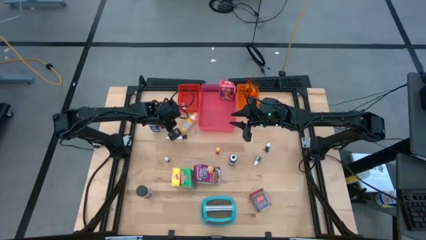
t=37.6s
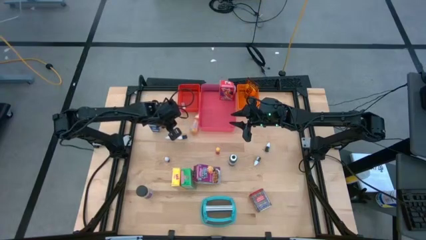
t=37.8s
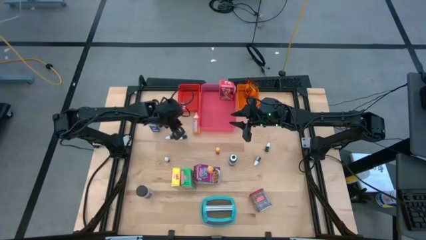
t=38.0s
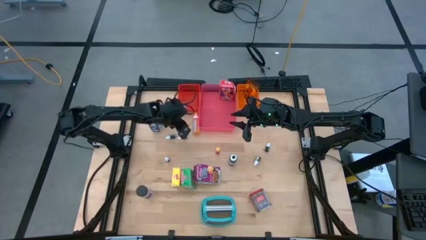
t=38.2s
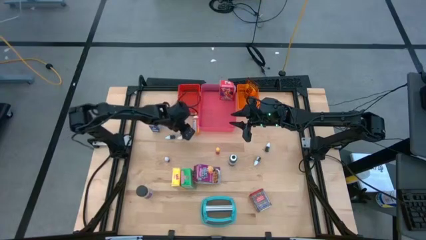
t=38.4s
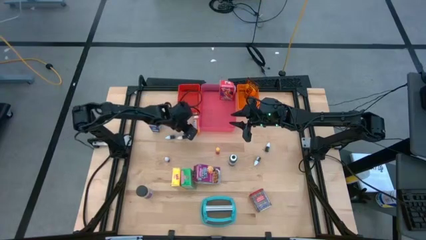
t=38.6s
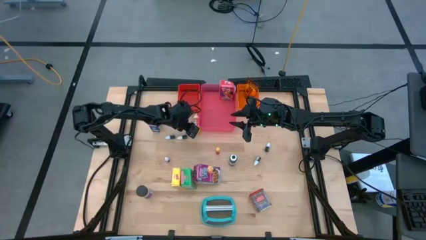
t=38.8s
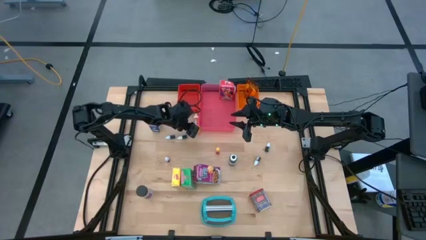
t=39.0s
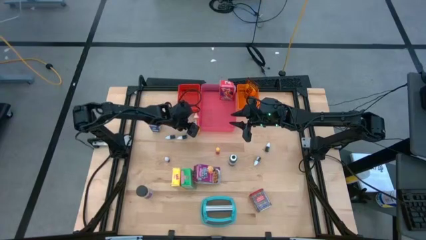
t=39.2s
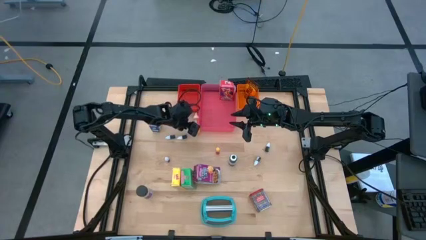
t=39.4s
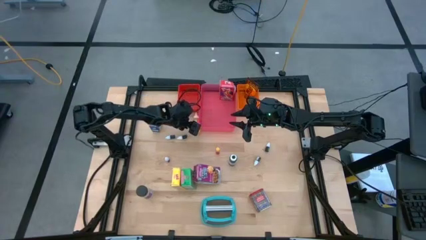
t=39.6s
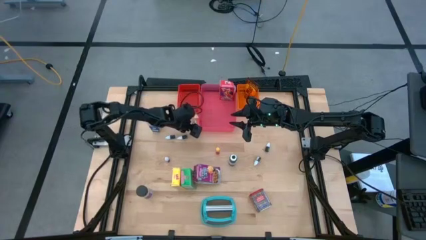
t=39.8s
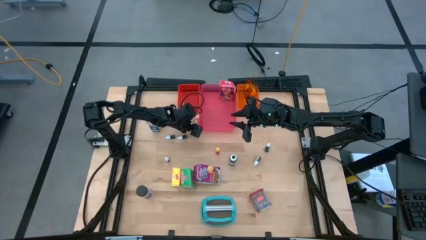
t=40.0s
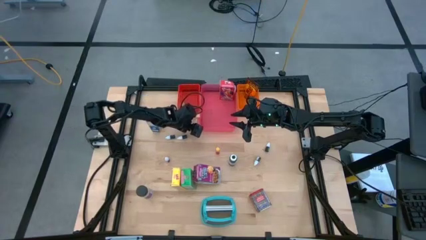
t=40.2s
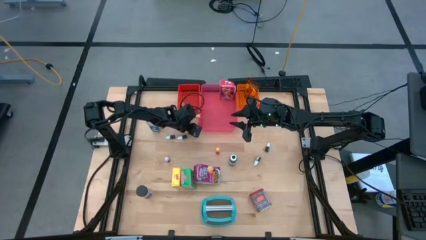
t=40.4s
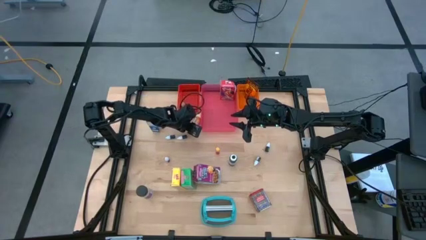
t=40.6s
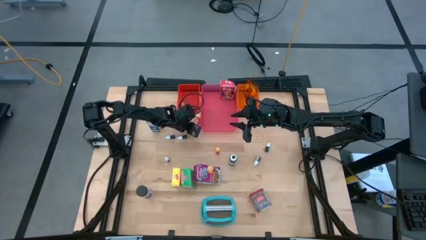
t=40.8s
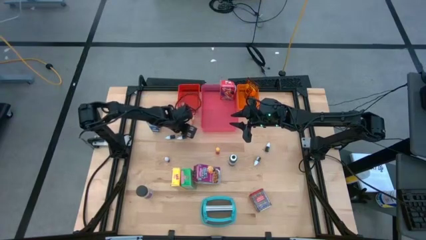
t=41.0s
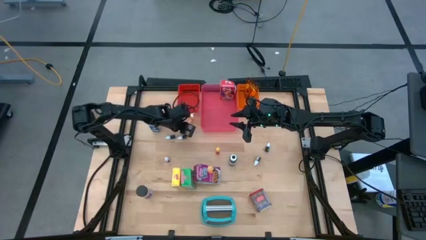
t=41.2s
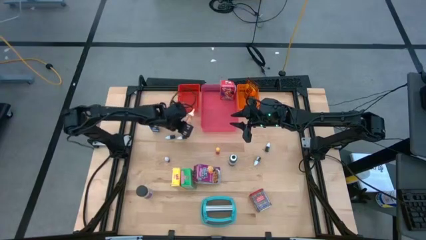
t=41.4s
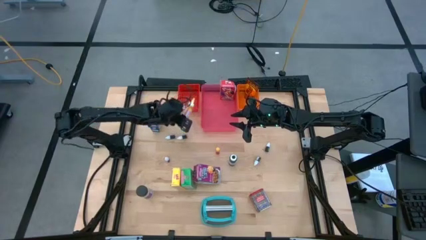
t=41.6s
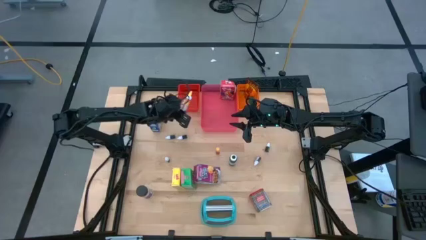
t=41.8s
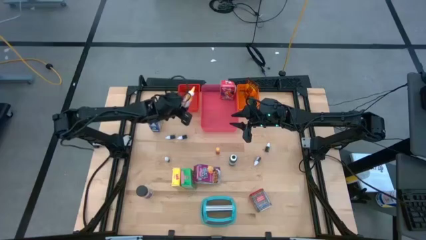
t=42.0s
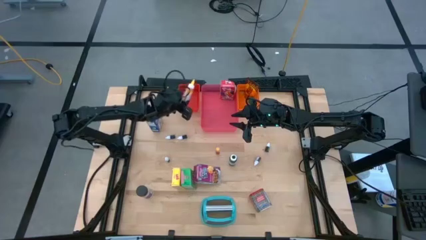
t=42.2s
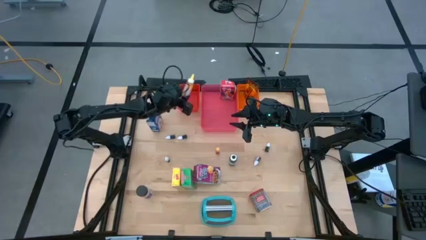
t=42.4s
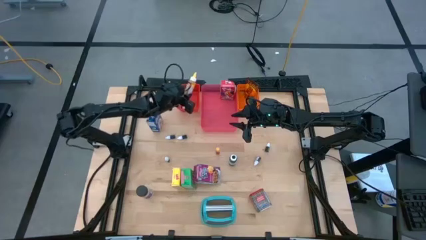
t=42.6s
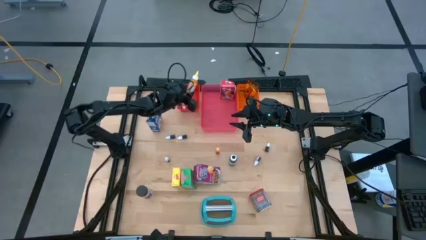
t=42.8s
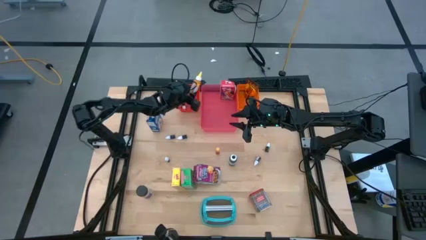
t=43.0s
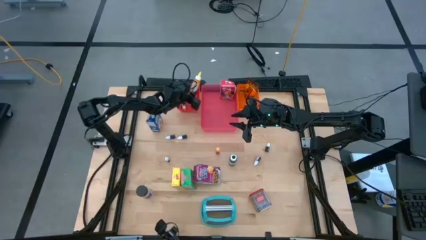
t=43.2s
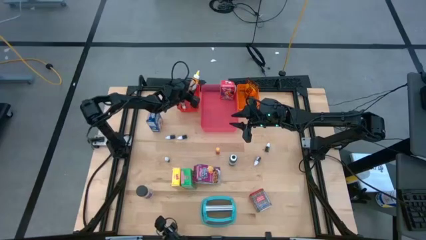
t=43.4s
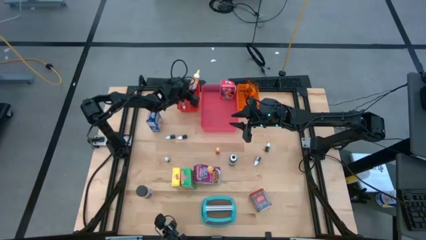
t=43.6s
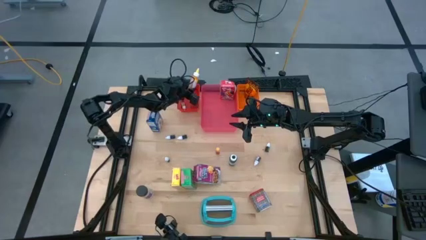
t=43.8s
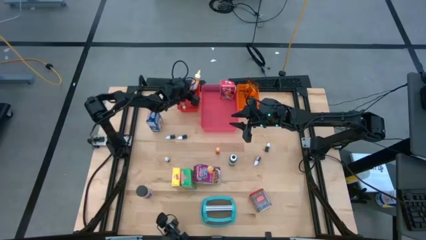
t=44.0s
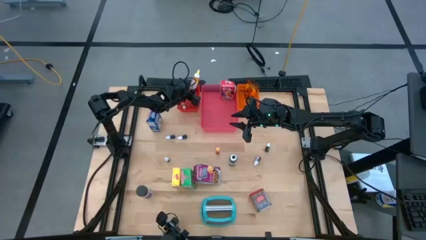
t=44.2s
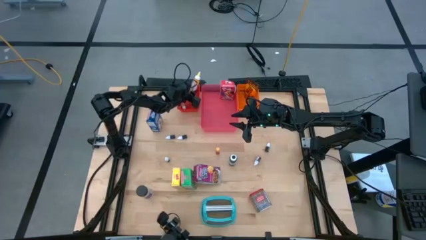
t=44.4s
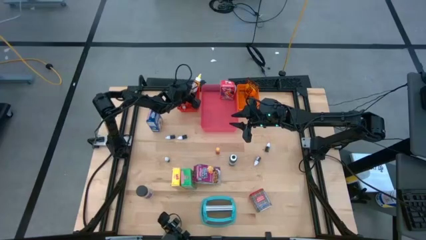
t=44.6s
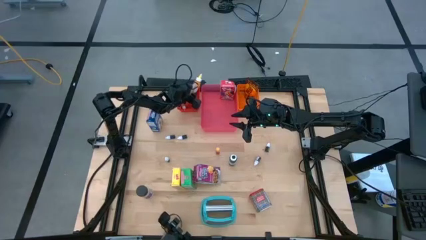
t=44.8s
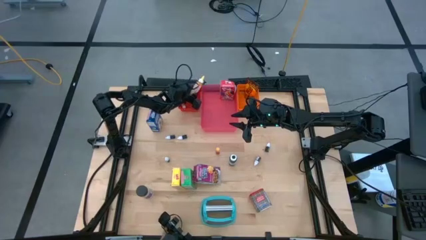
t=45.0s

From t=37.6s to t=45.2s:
Task: Pick & Place Kitchen Items
Put the large yellow food coloring bottle into the red bin

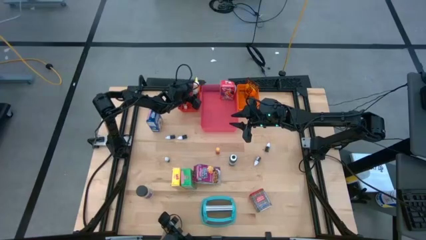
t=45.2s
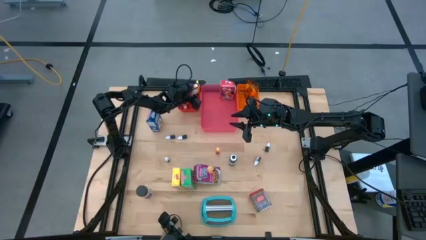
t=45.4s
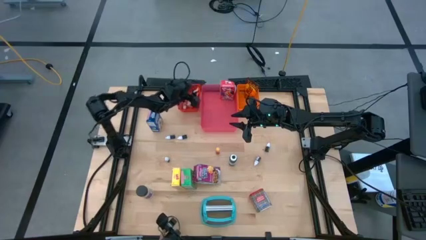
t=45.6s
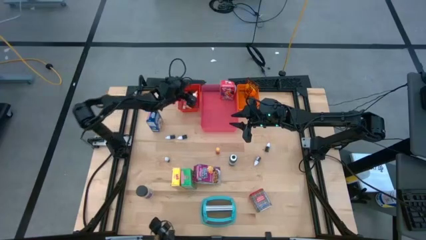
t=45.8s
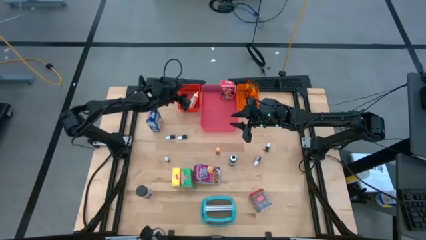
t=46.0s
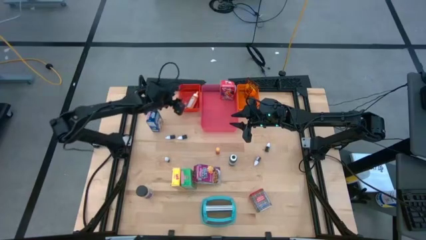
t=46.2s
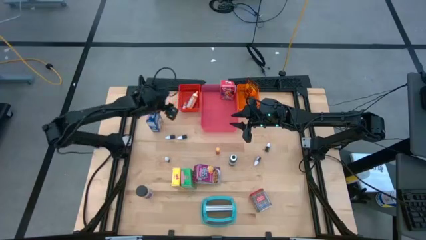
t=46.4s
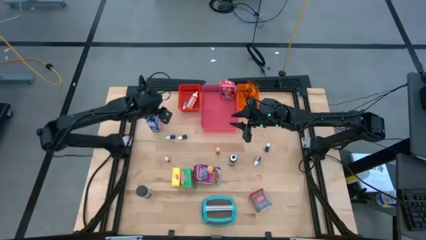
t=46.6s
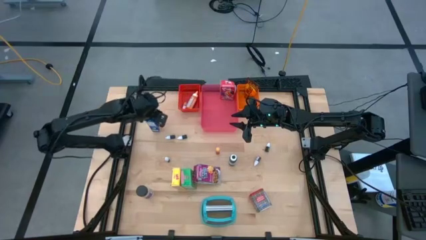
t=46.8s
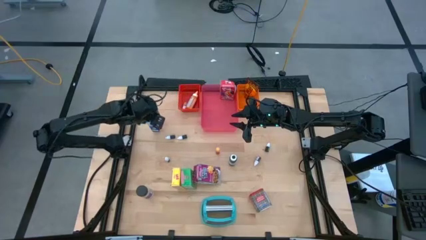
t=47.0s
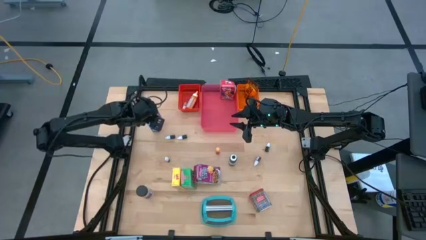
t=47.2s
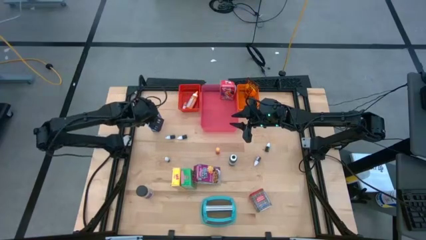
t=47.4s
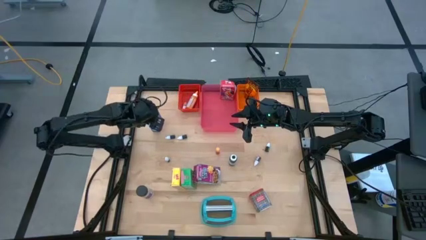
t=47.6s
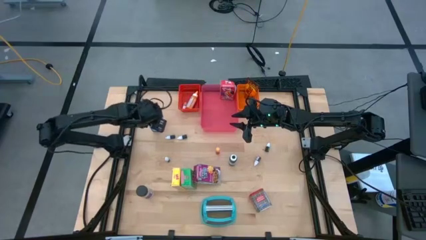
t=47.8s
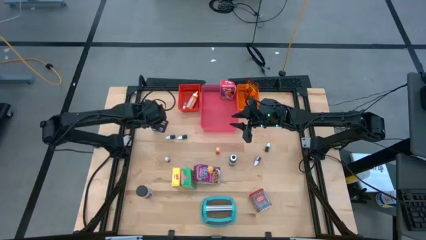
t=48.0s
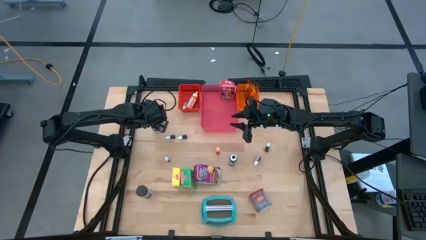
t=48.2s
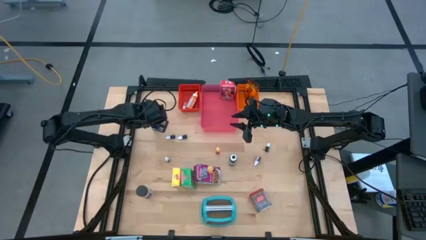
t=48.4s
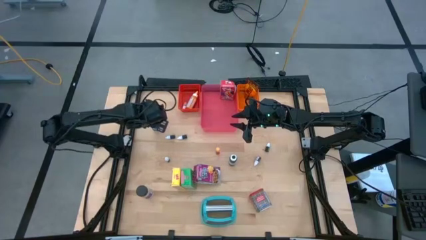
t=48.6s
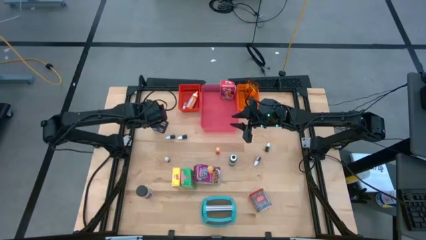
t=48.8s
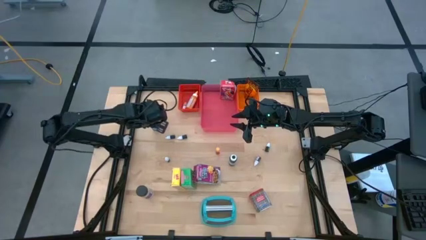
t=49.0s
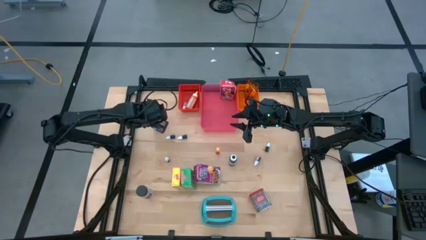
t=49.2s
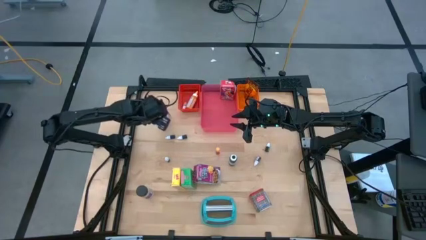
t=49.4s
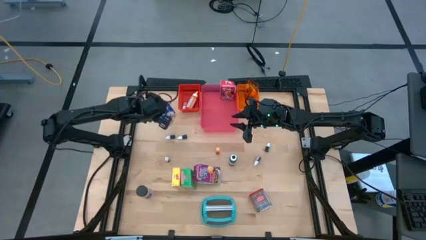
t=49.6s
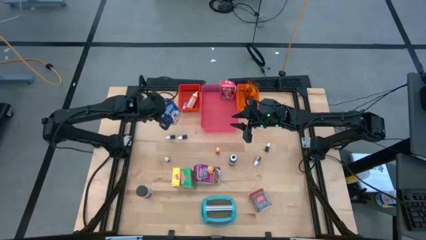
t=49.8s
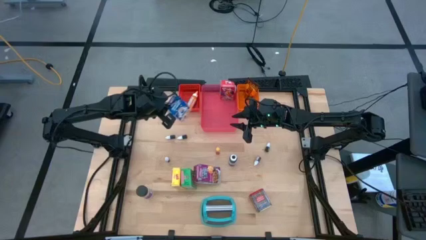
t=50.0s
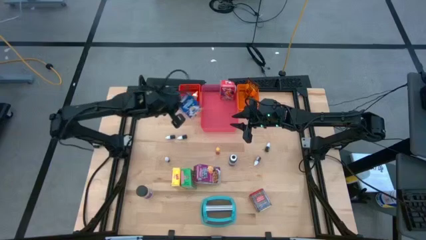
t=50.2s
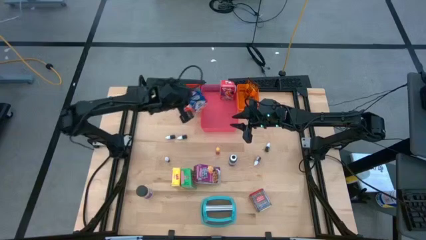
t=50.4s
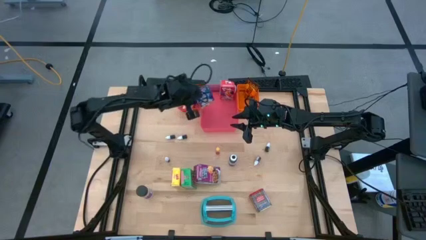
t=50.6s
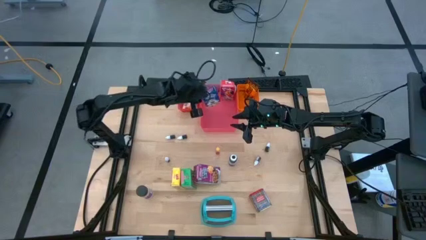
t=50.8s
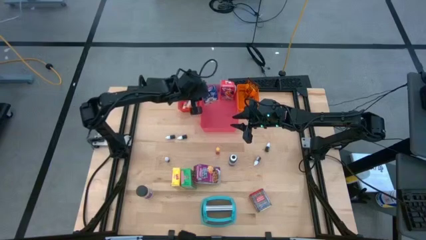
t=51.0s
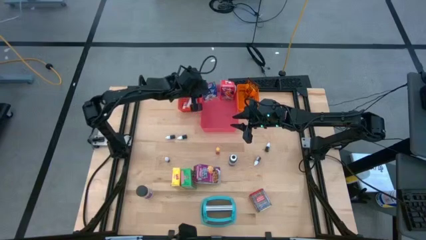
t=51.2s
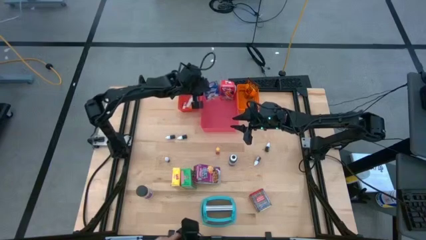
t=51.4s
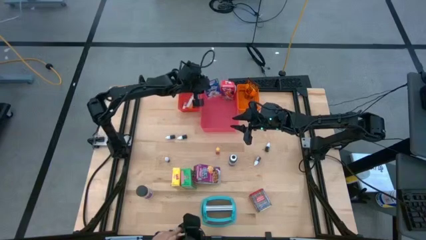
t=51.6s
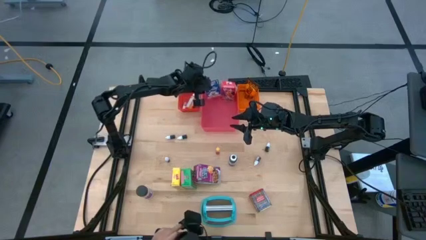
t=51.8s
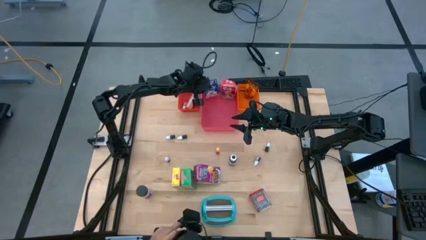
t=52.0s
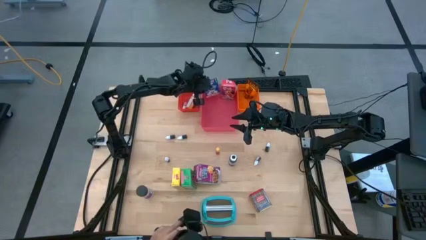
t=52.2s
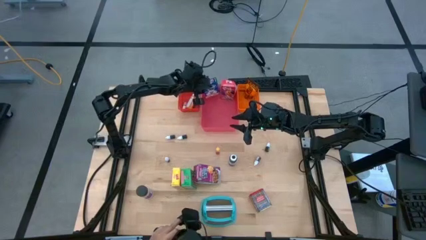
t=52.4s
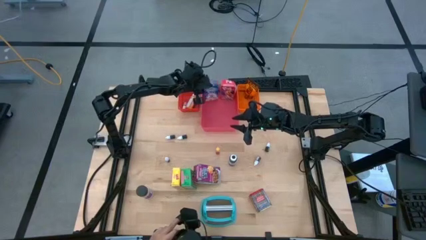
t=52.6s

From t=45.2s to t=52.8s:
Put the blue cereal box into the pink bin

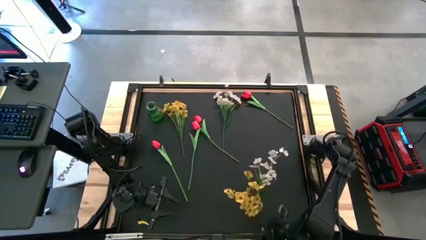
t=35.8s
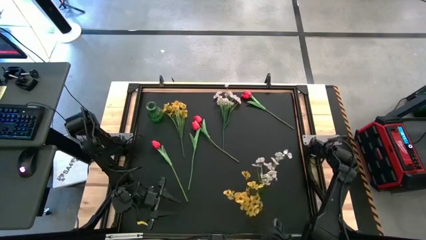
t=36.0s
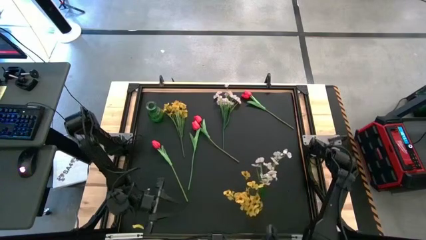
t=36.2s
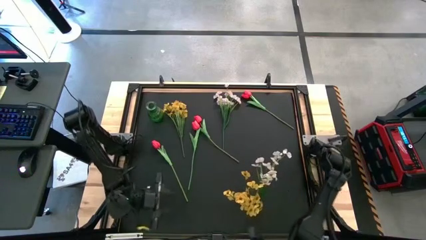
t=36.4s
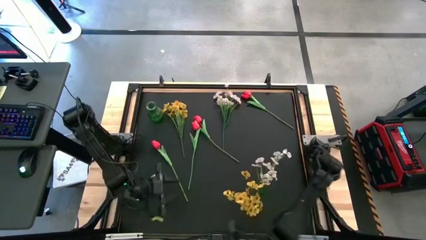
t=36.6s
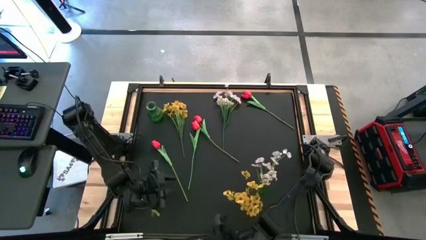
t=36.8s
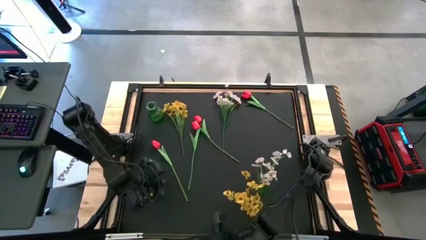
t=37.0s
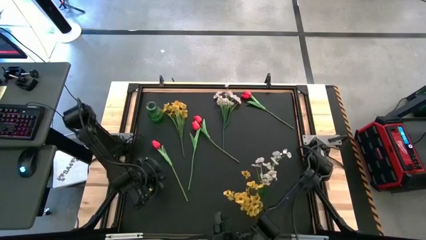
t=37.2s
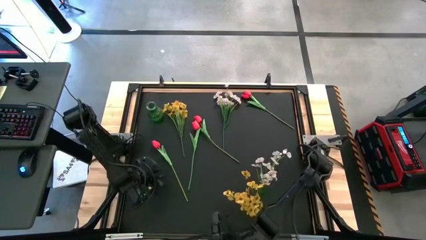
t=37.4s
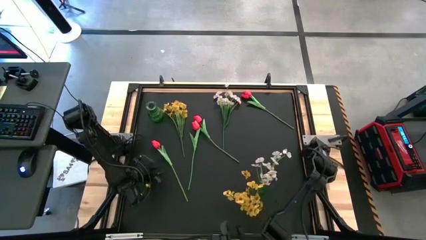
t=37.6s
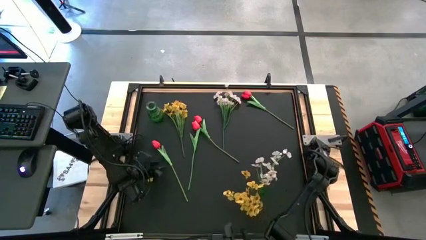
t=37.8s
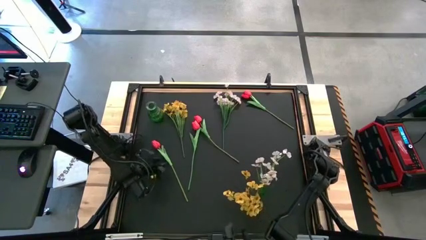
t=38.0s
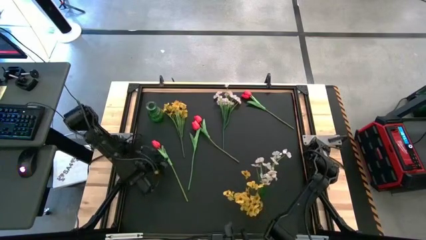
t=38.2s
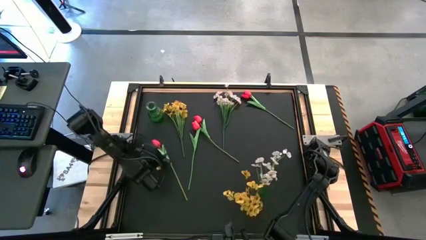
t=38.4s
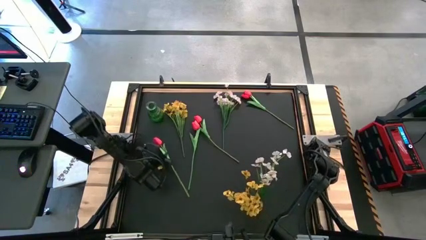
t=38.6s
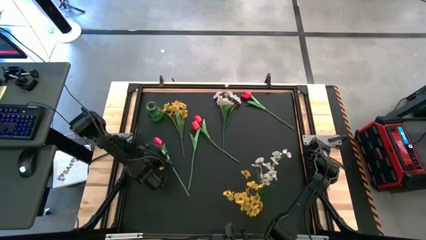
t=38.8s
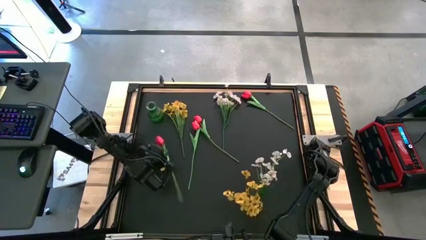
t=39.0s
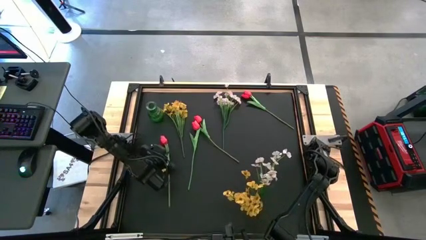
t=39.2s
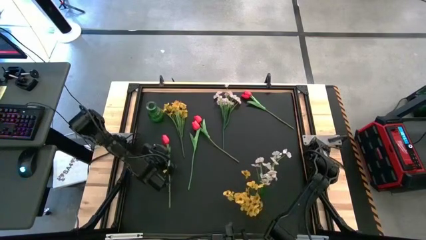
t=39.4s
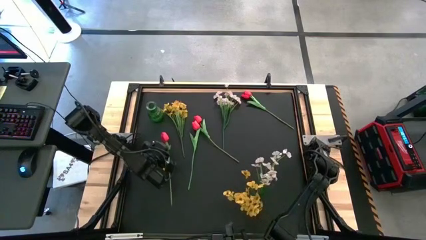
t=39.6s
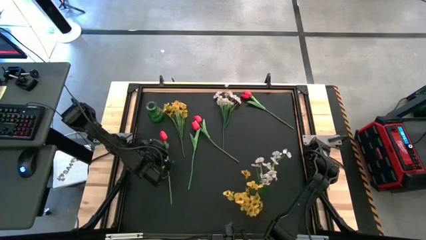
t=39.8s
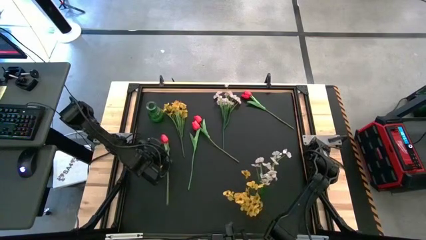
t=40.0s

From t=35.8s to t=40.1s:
Task: Sort flowers into vase by color
Put the red tulip into the green vase
